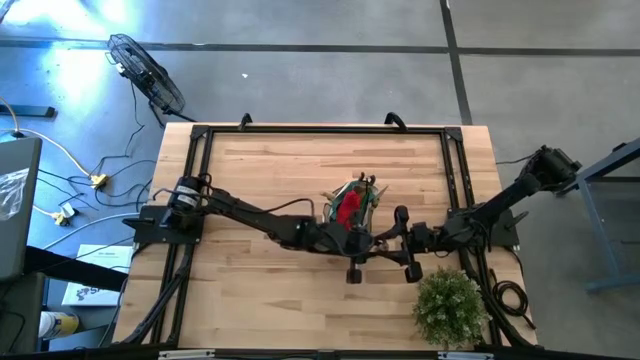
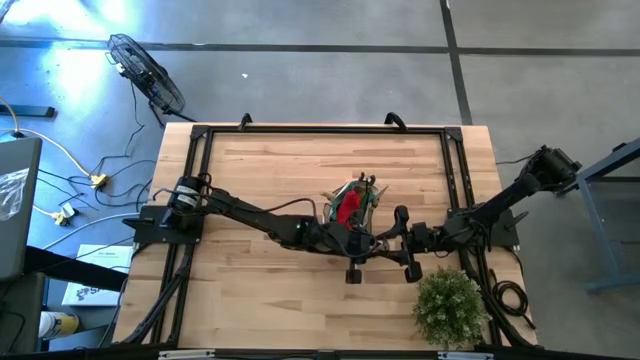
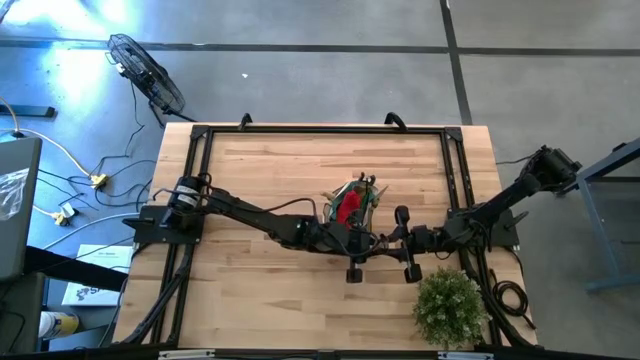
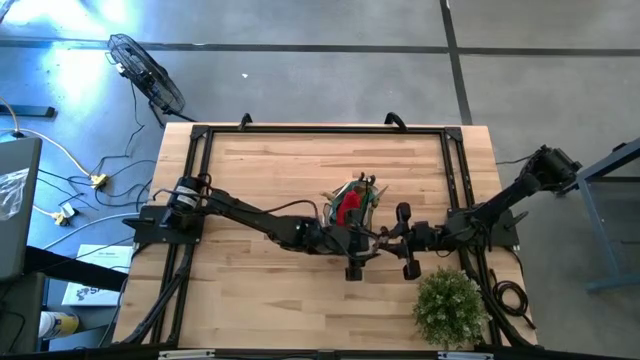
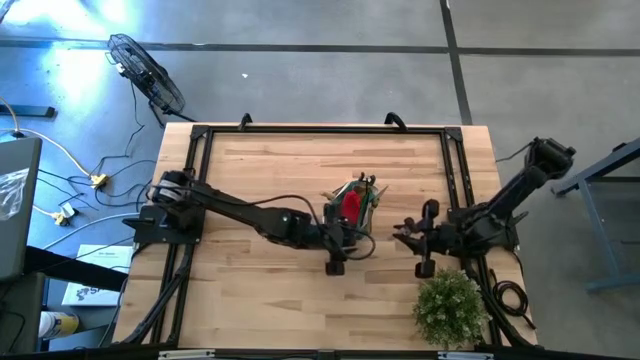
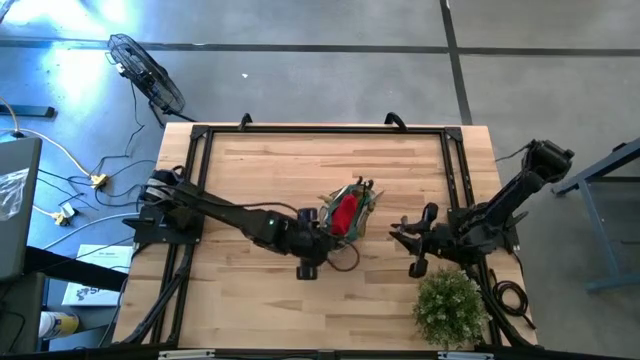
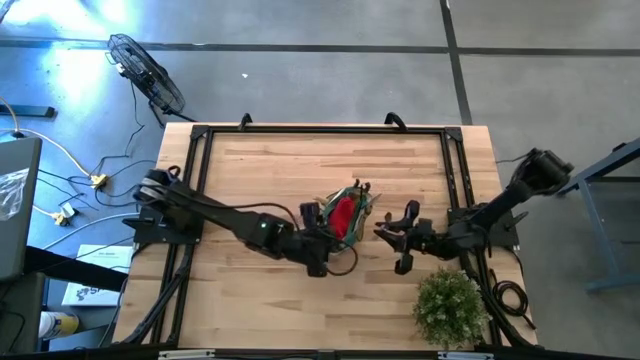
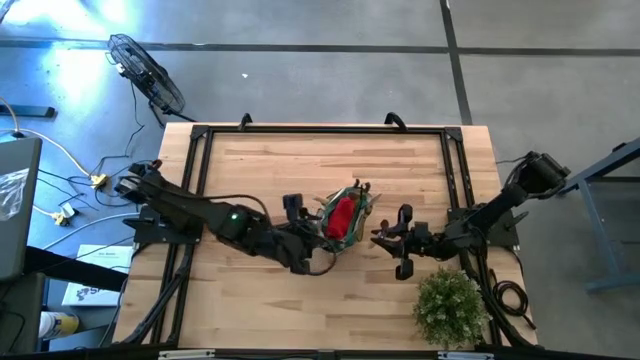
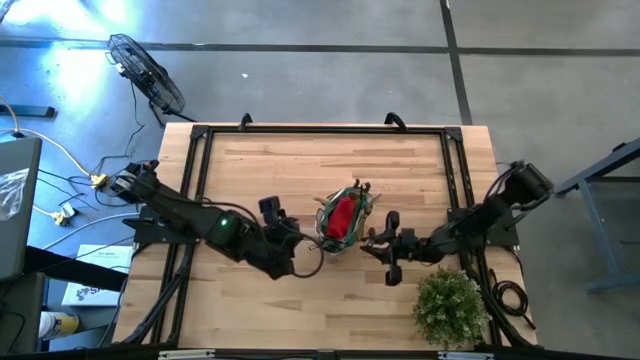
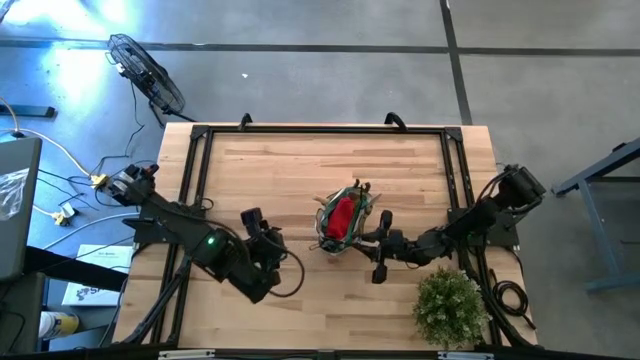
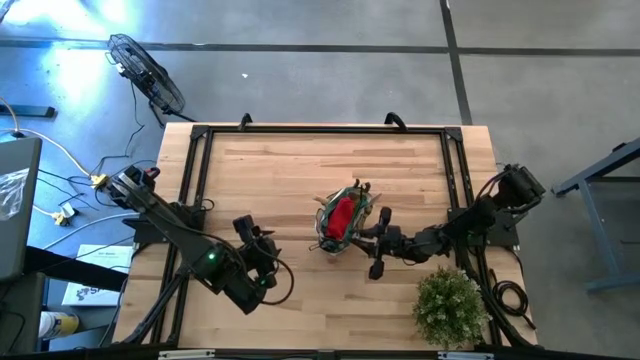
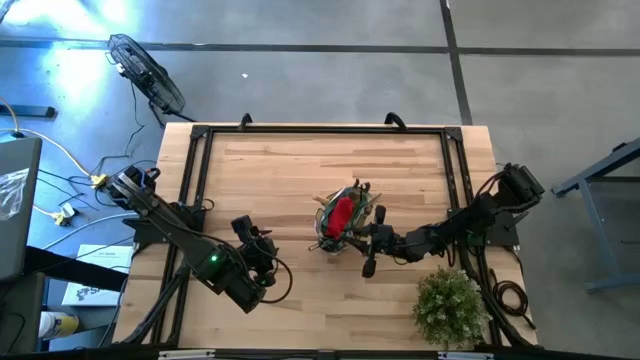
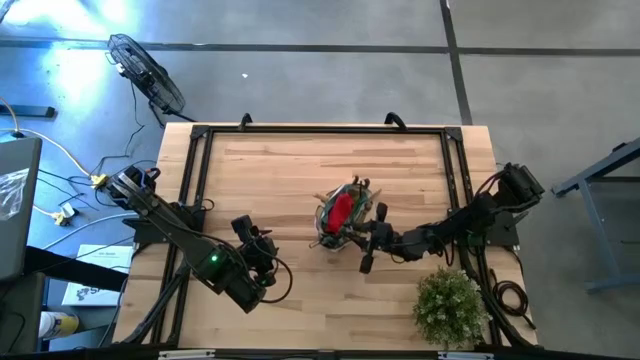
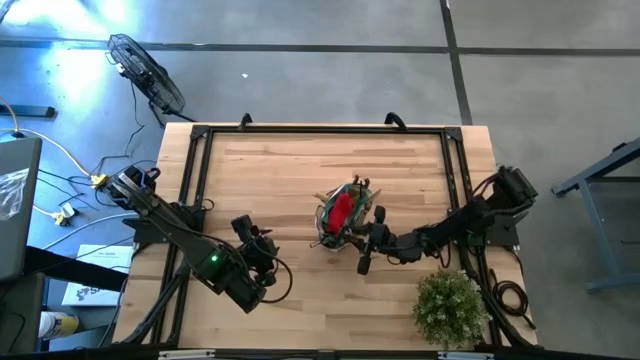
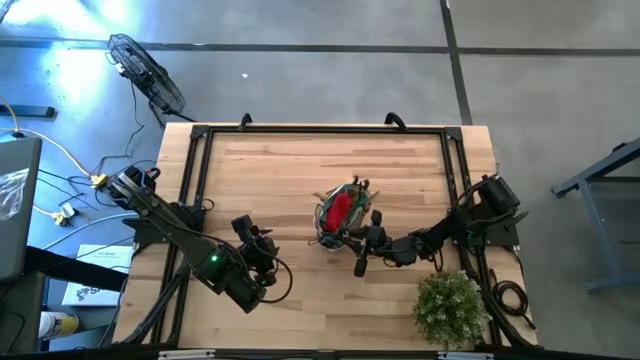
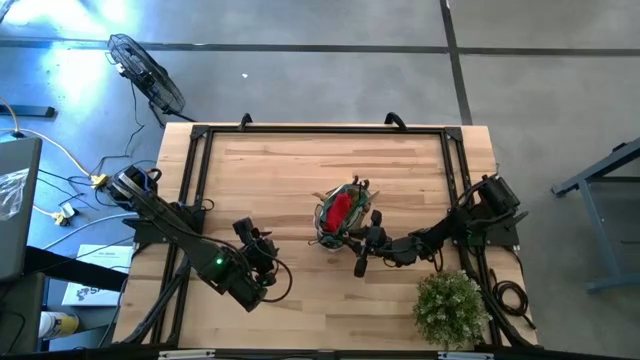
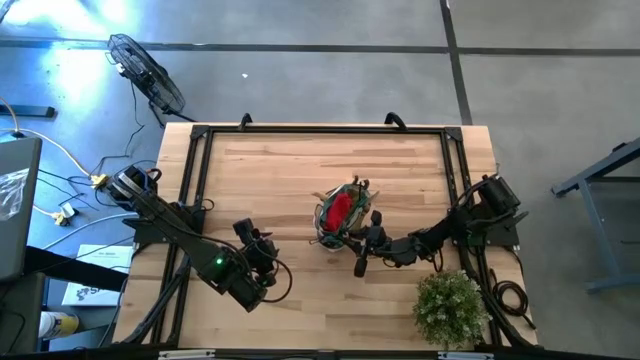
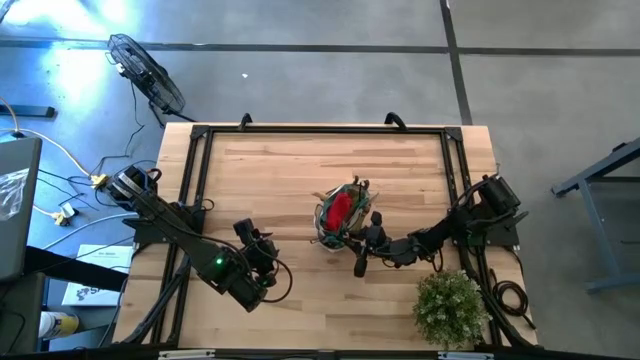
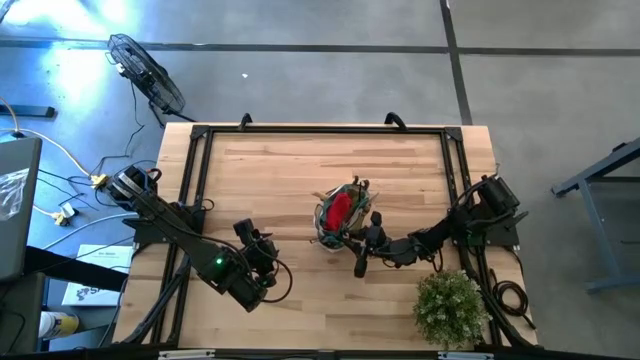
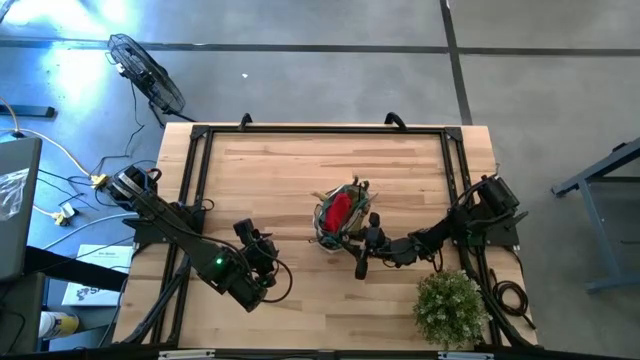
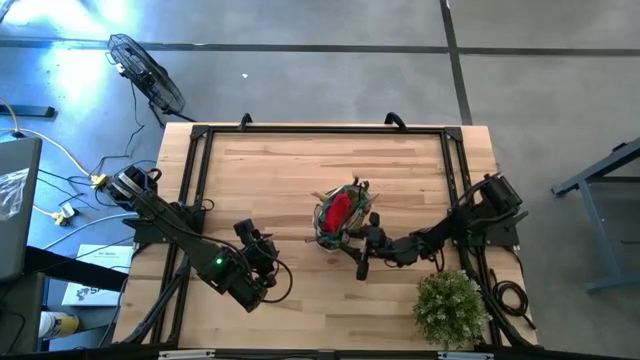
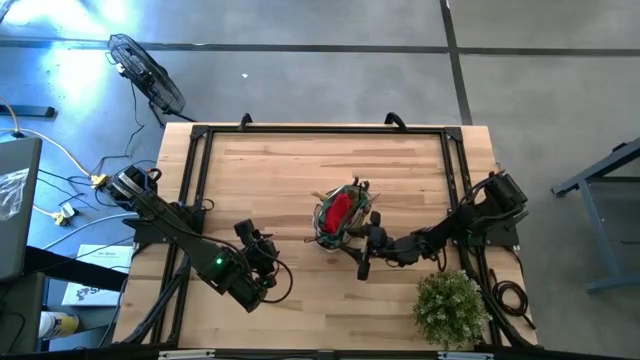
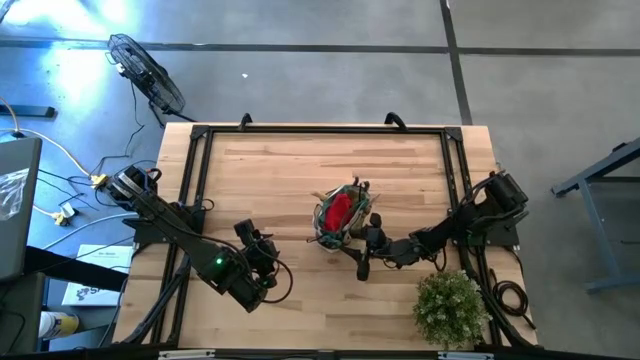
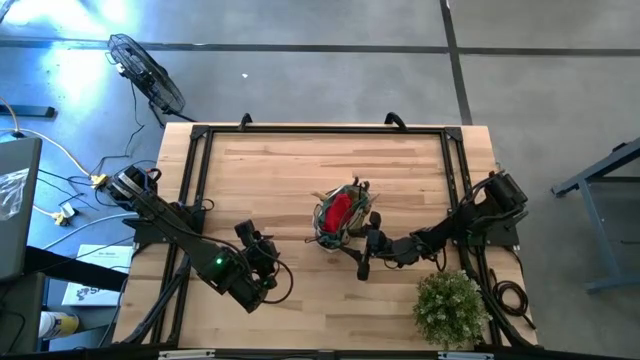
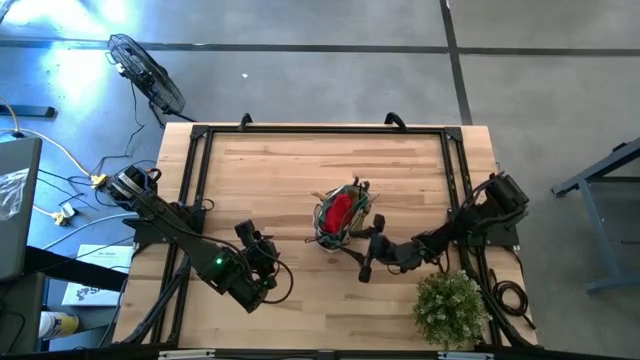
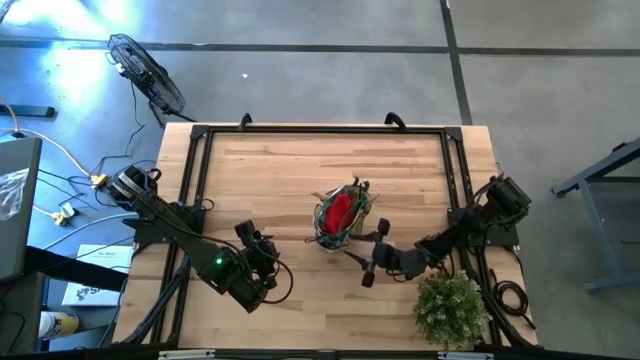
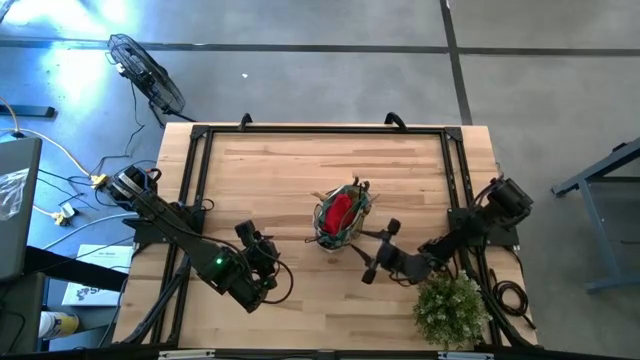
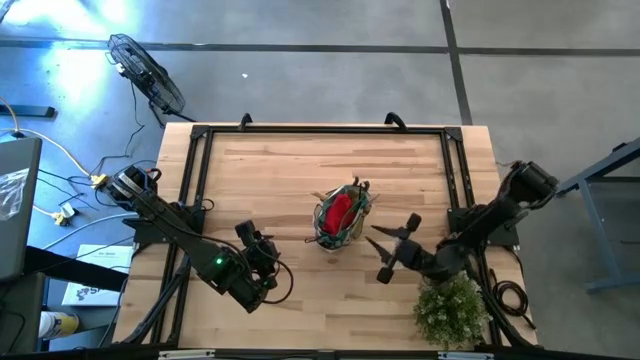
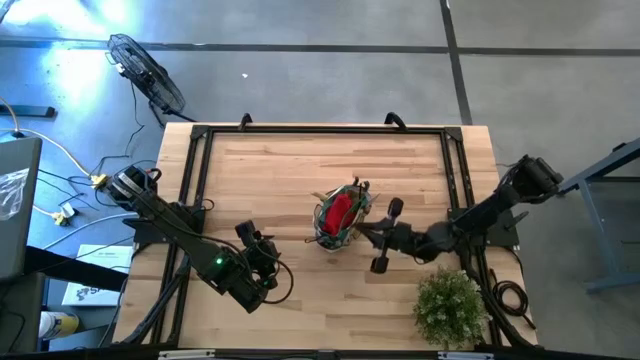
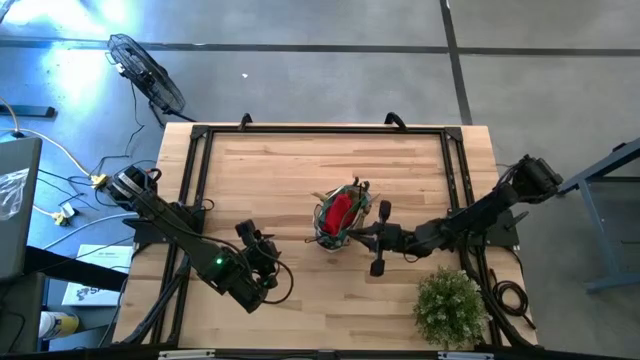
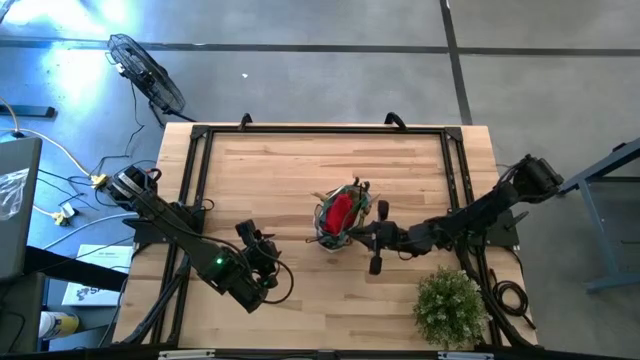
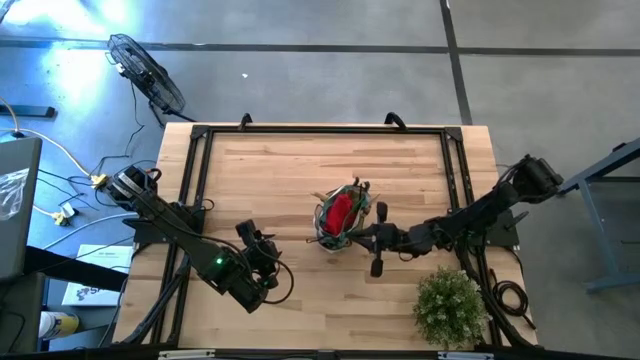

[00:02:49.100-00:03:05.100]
Task: Pick & Place Garden tools in Gardening bag
Put the brown trowel into the green gardening bag

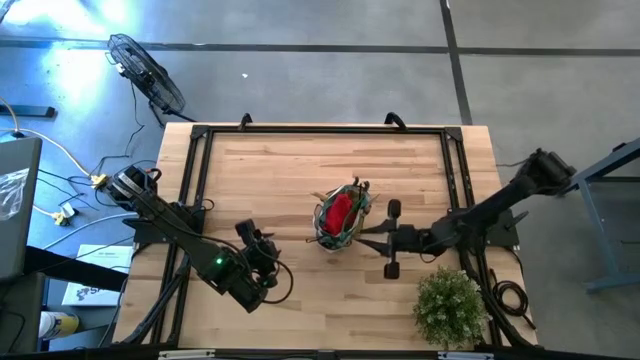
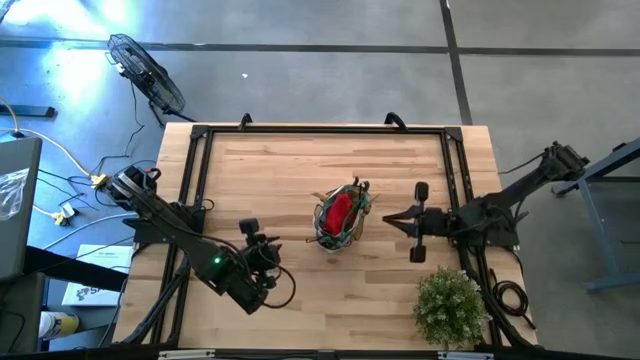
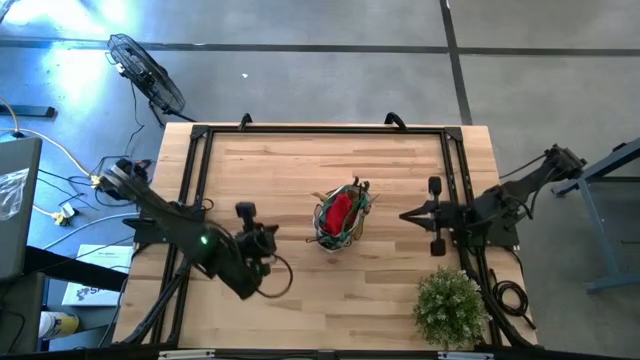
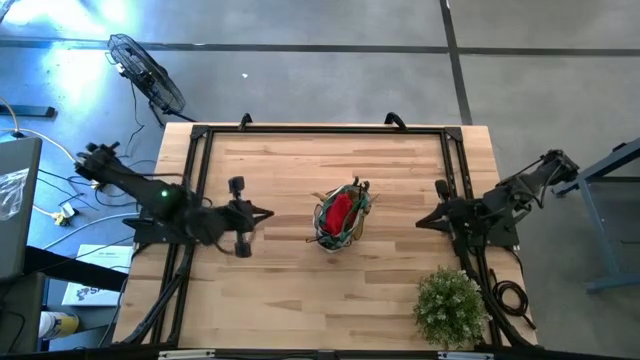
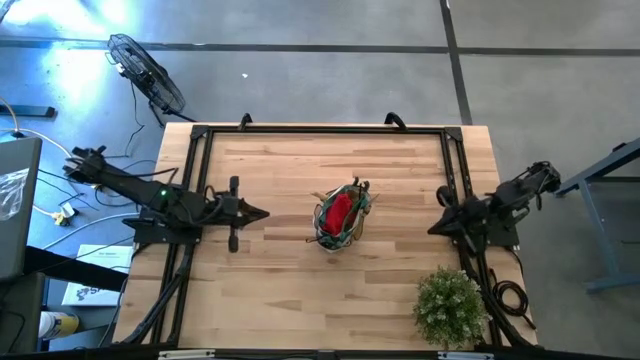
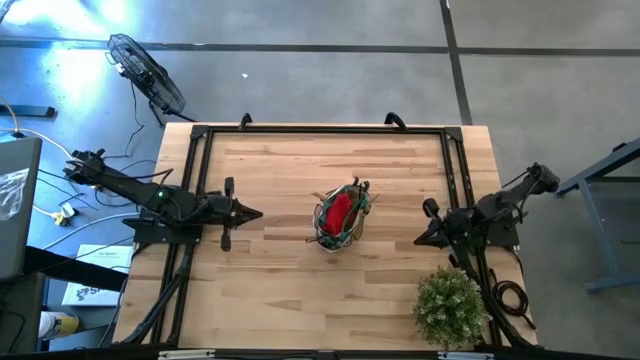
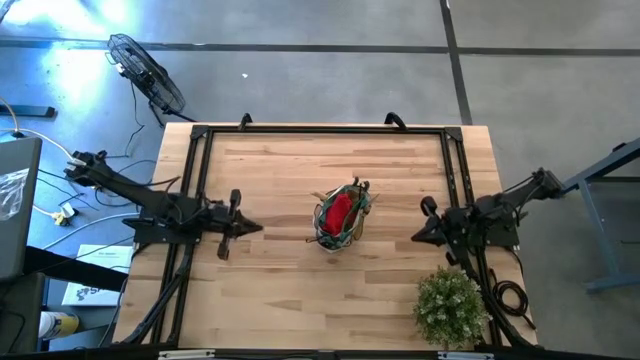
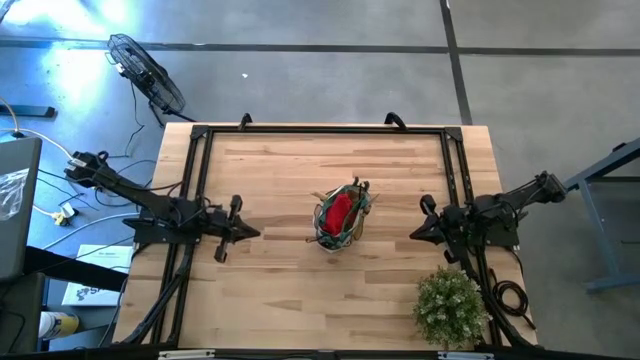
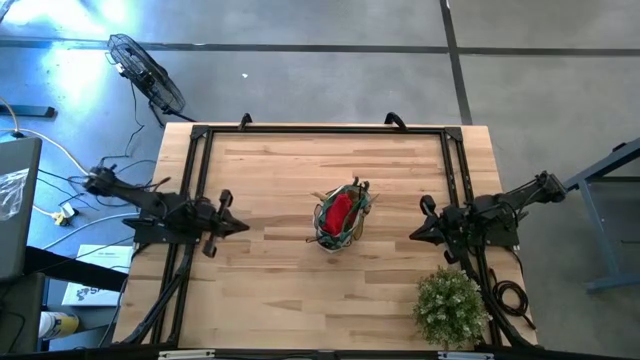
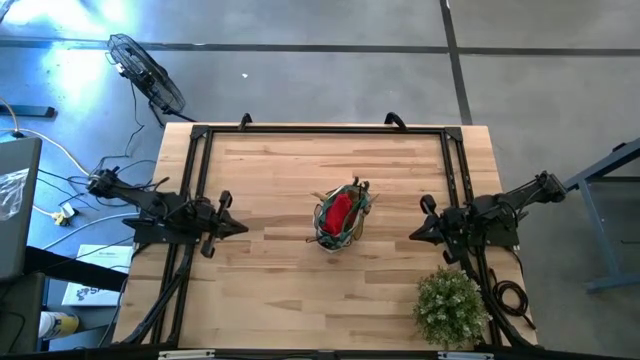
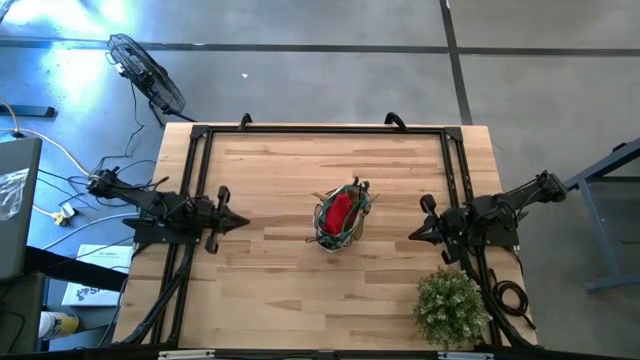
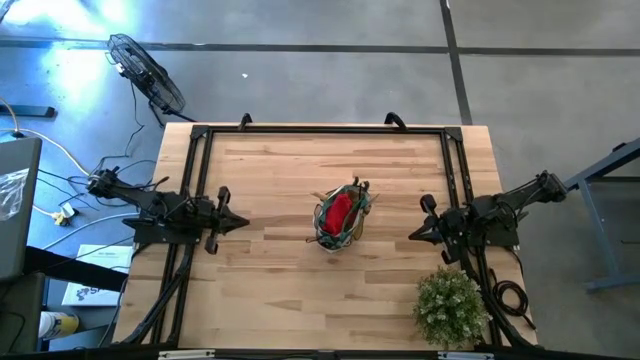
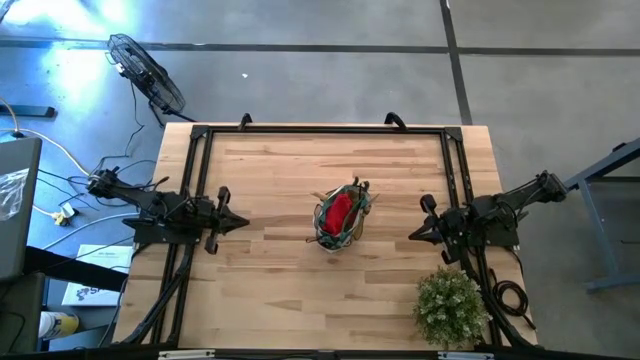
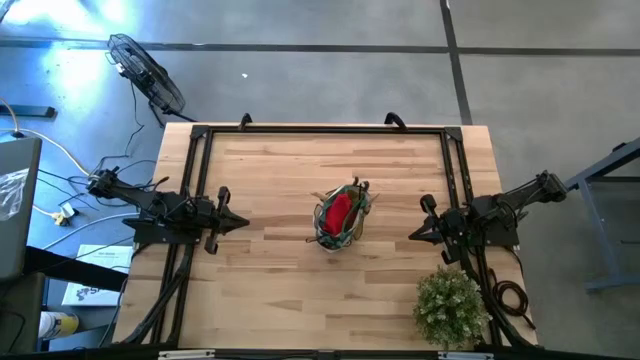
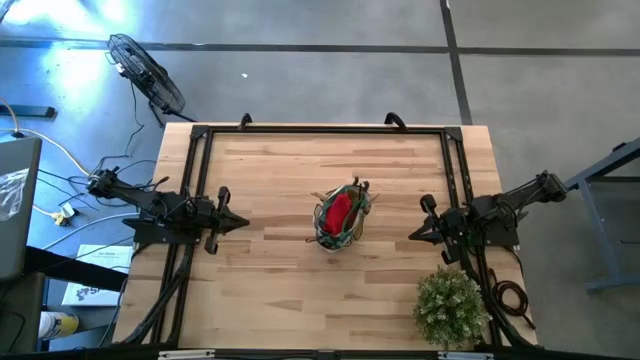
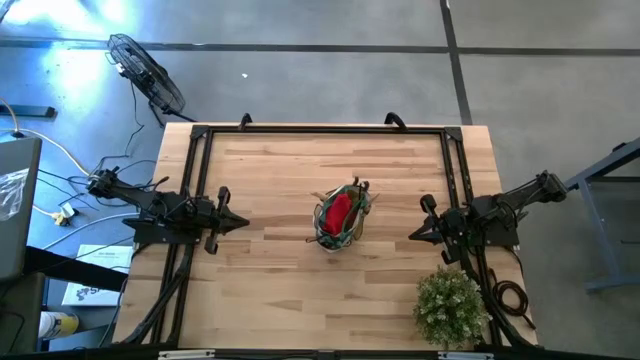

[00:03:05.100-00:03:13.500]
Return to Home Position
